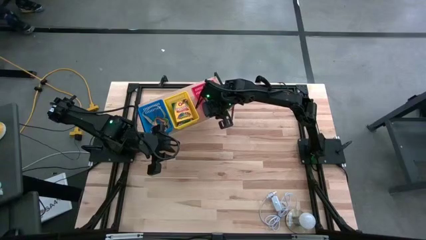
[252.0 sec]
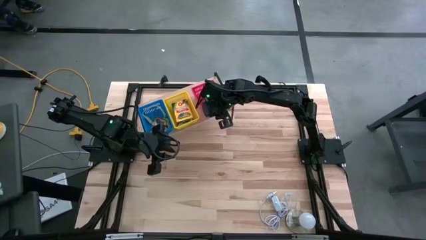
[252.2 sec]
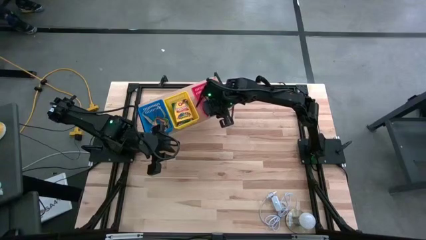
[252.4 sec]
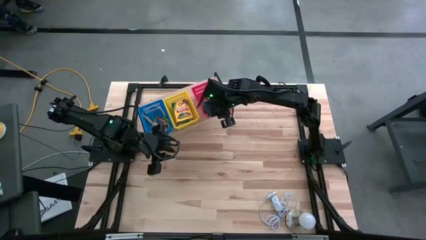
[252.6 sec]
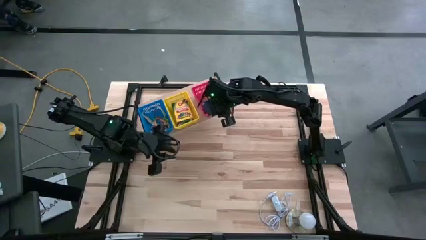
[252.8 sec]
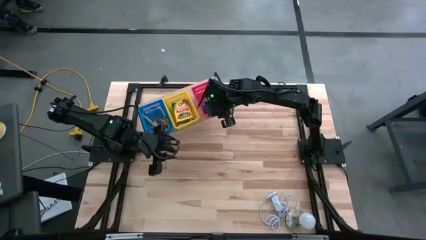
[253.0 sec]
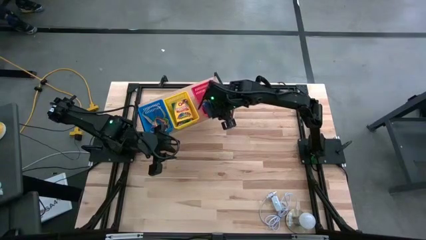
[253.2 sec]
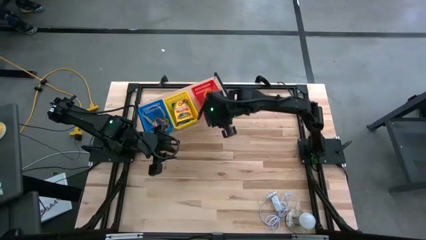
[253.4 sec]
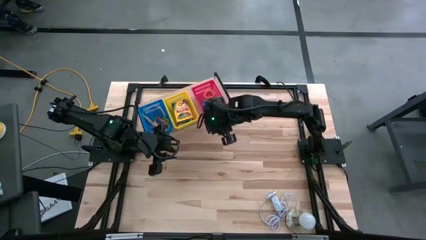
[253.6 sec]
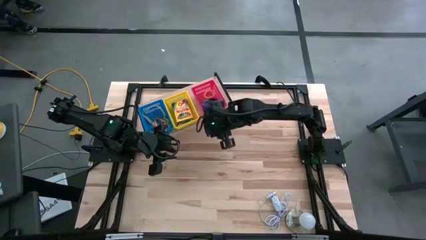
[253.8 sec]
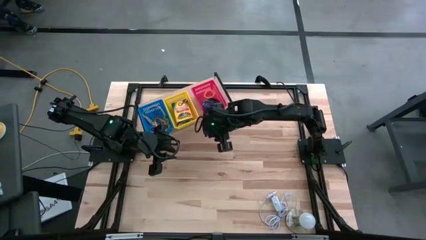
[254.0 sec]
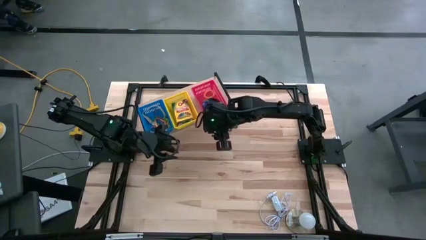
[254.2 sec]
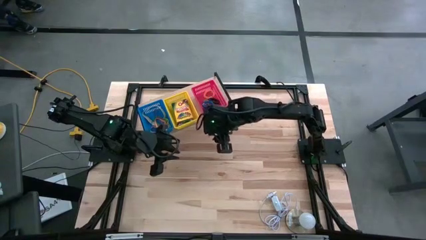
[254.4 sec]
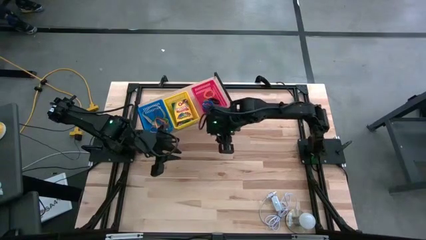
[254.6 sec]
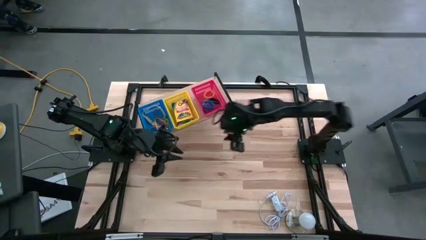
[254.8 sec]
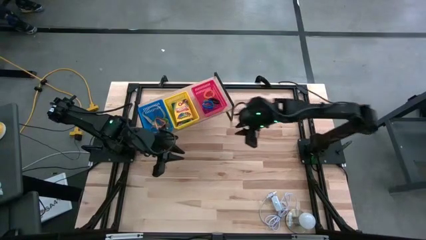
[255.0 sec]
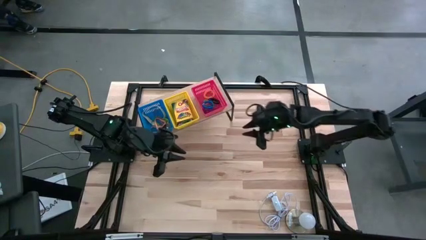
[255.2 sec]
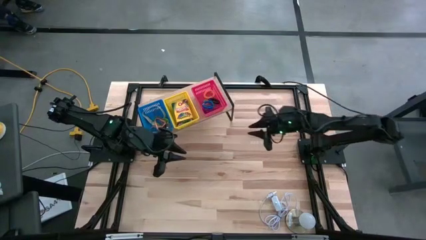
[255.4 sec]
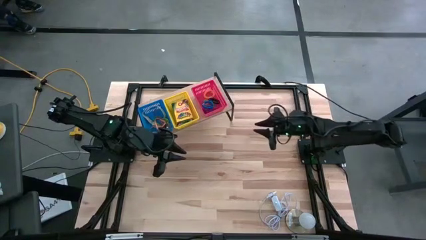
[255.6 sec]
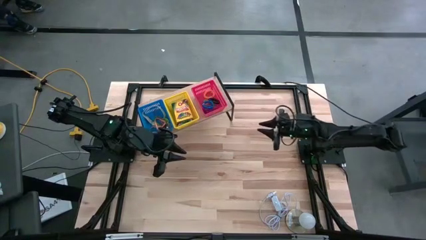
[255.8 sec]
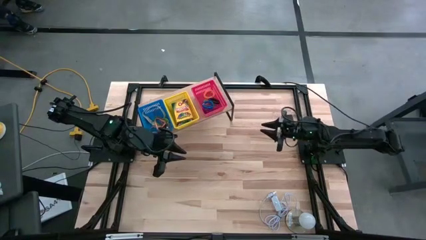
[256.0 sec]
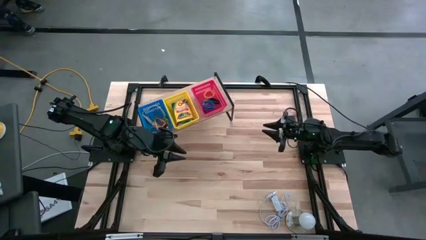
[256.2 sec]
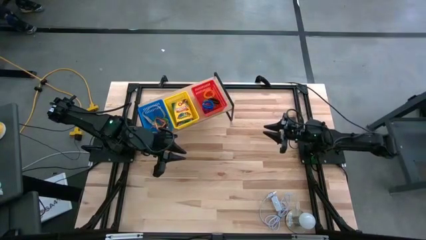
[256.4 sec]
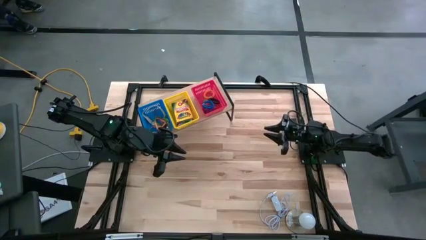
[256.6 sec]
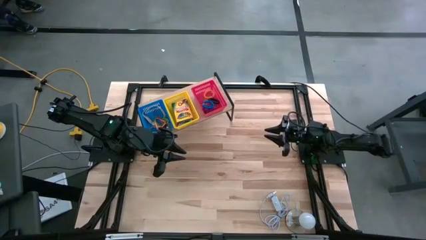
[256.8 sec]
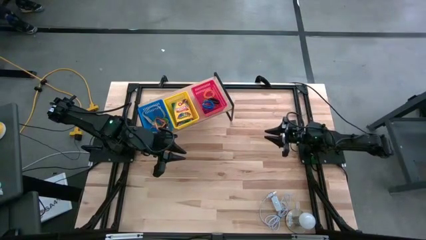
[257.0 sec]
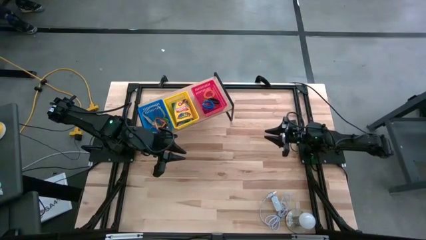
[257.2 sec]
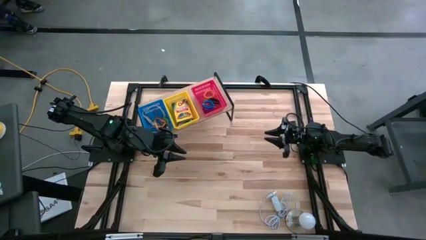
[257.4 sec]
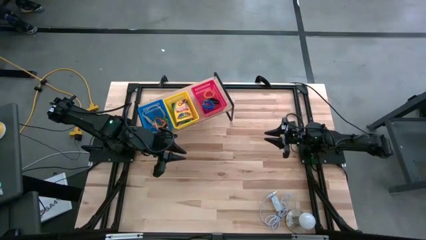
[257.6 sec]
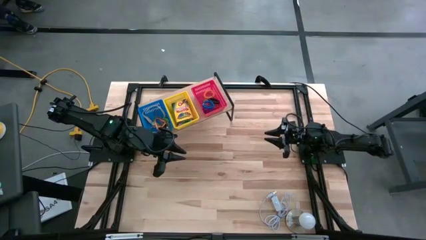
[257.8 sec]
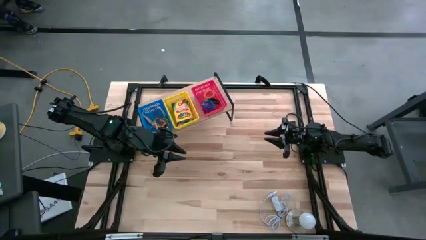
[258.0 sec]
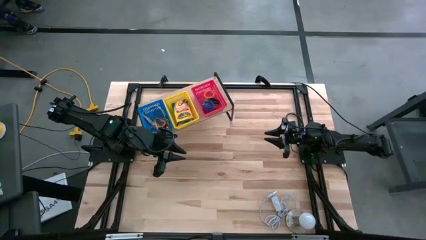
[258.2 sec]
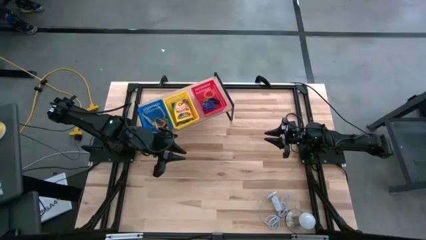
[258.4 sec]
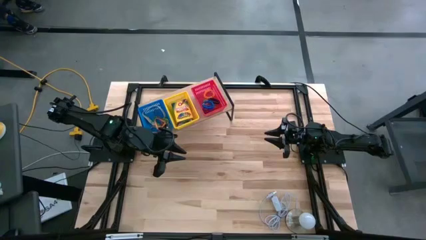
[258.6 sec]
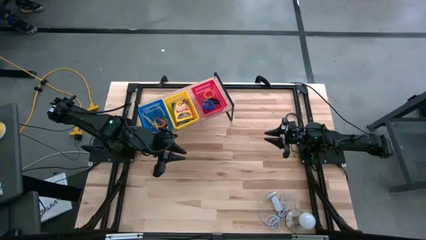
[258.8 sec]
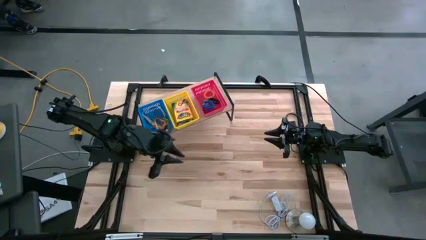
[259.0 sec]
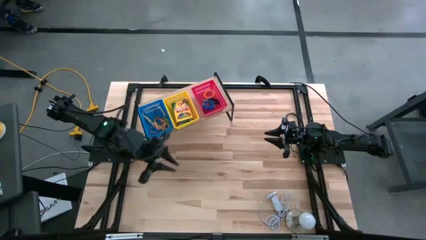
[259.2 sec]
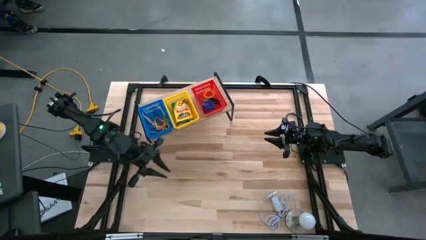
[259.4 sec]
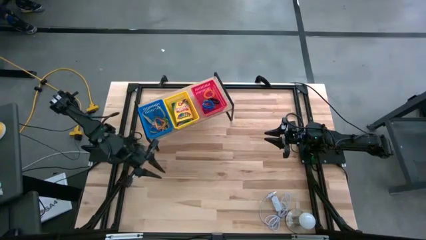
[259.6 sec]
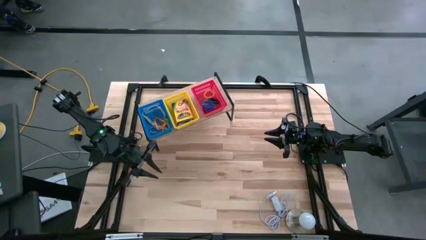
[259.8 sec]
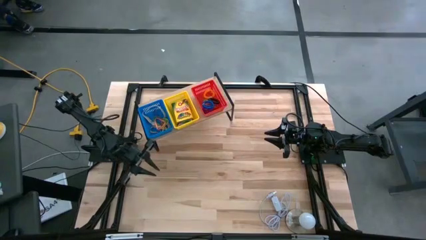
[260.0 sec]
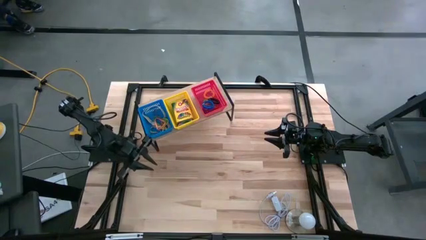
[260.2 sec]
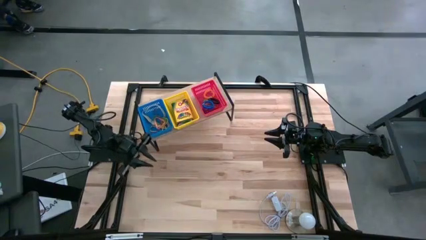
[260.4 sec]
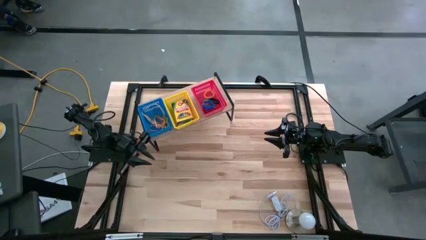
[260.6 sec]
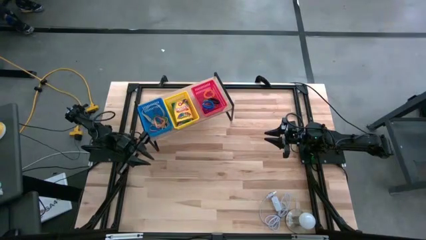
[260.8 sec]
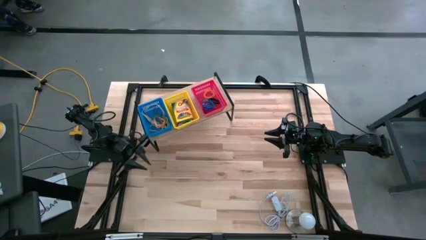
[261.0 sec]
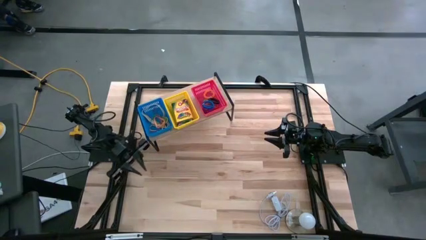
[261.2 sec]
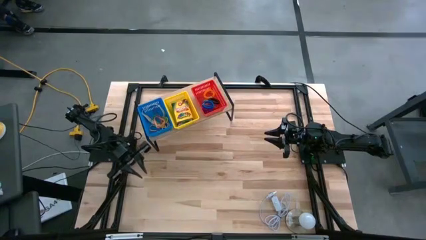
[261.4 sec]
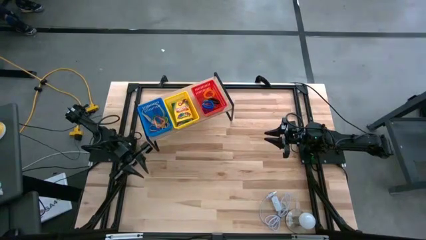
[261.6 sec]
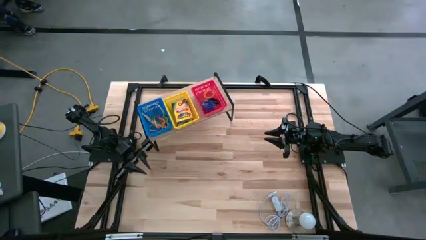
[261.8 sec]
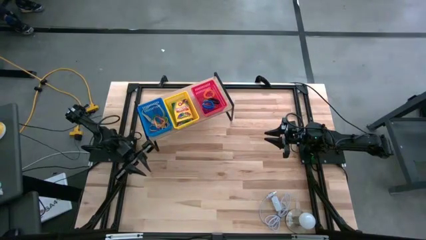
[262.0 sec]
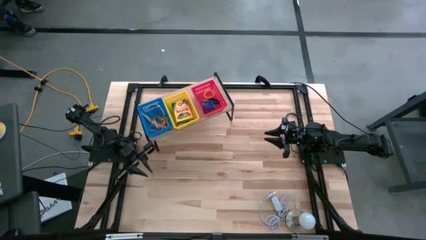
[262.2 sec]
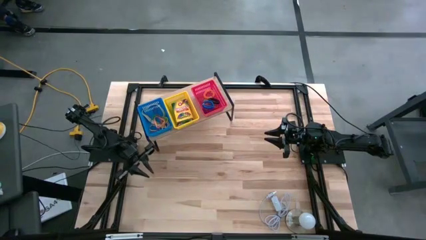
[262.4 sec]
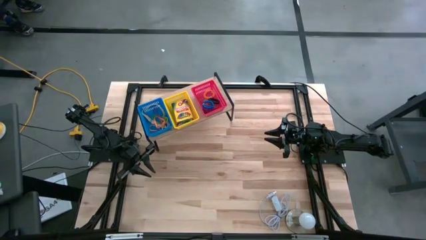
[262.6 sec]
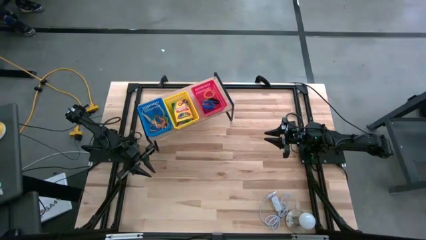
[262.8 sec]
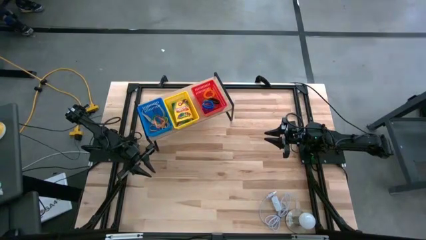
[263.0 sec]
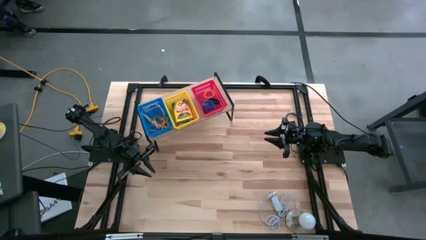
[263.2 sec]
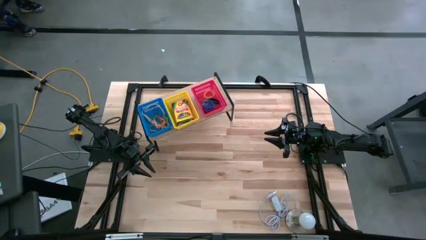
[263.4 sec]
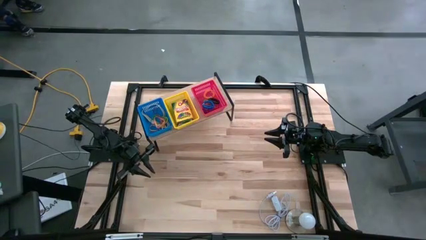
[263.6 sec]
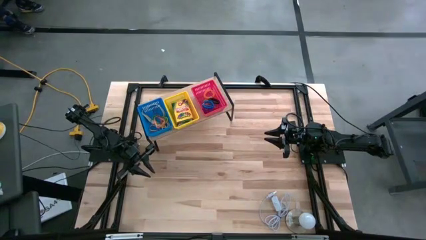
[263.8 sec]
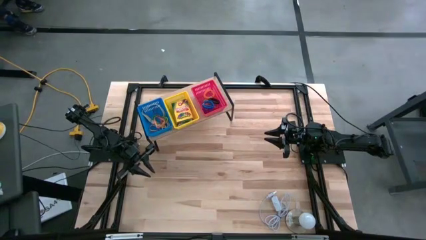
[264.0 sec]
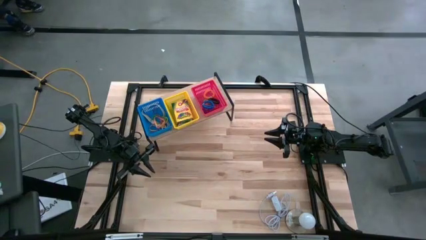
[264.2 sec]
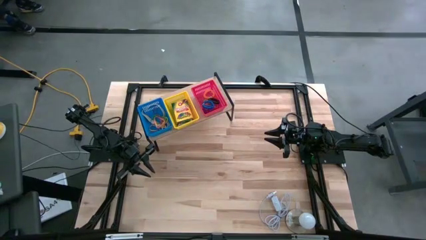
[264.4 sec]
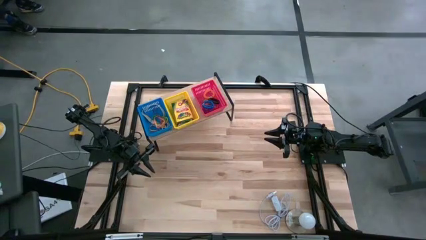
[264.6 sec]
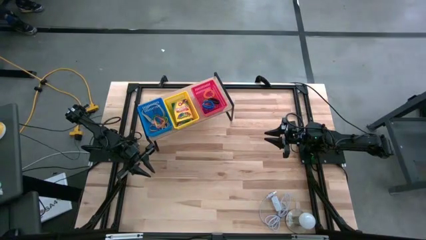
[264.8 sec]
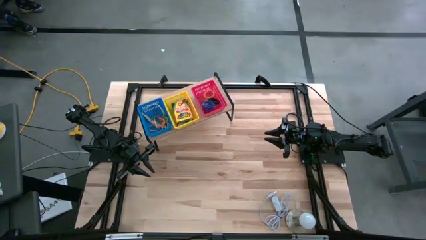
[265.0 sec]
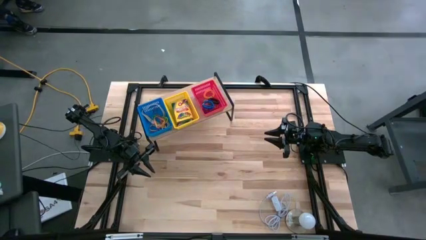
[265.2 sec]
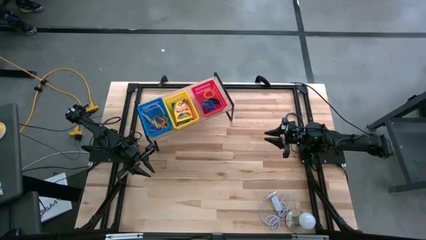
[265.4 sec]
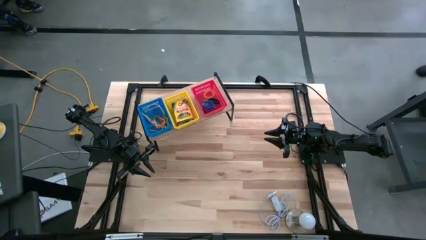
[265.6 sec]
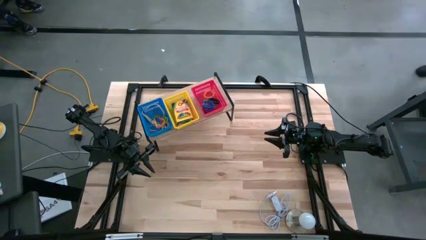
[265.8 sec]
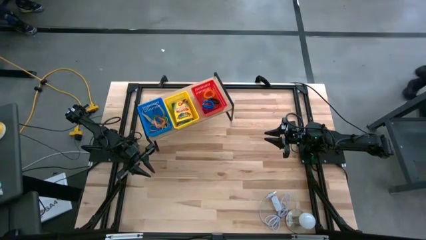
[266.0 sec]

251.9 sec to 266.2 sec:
Task: Pick & Place Office Desk Supplies
Return to Home Position
